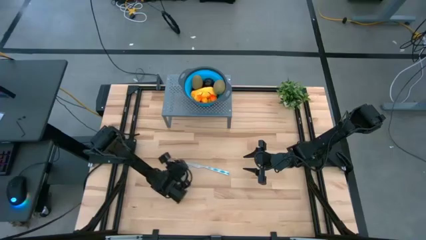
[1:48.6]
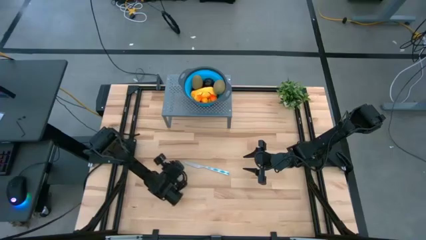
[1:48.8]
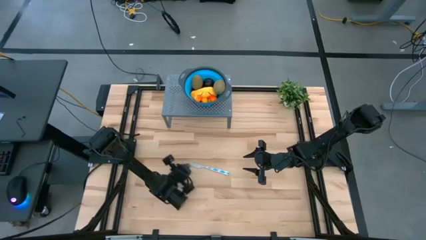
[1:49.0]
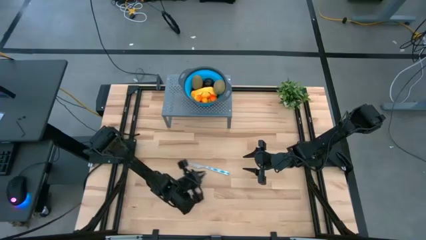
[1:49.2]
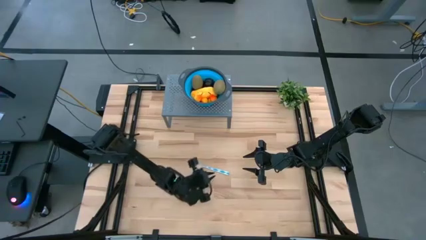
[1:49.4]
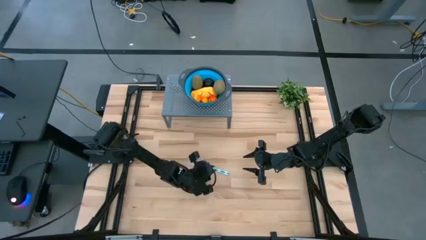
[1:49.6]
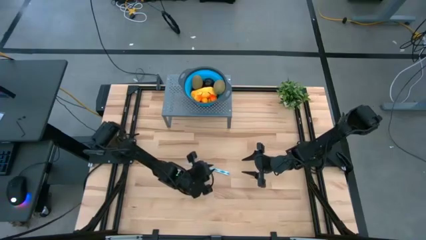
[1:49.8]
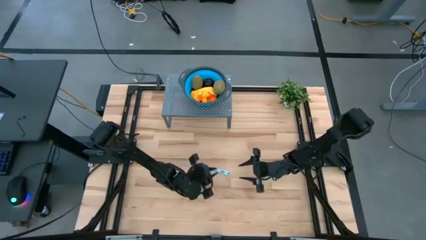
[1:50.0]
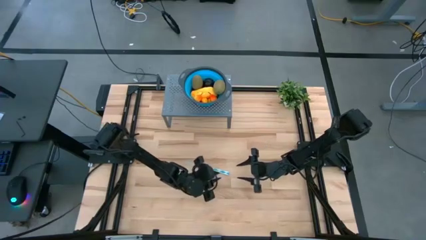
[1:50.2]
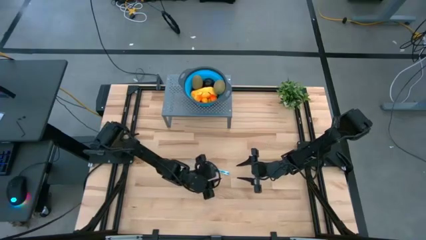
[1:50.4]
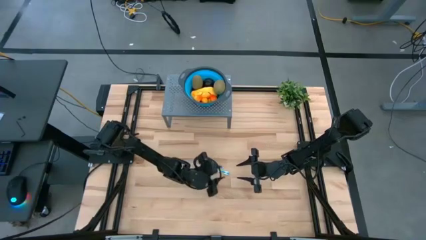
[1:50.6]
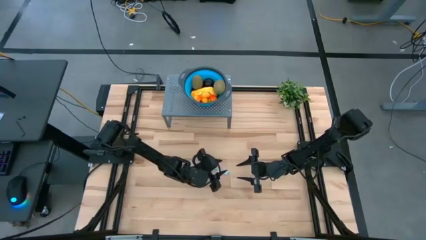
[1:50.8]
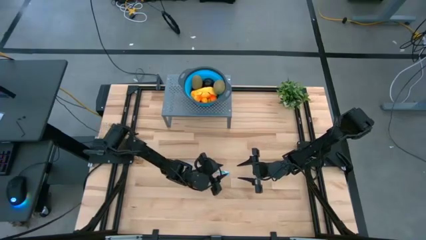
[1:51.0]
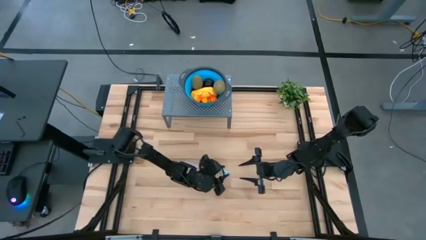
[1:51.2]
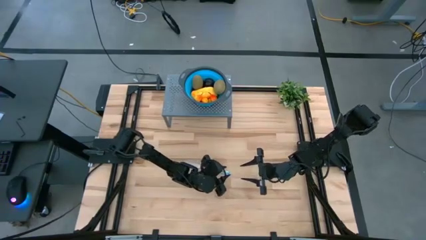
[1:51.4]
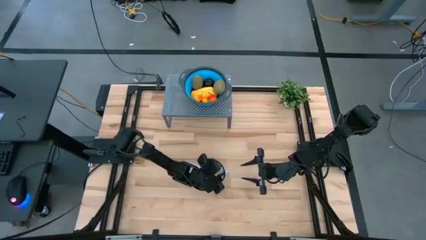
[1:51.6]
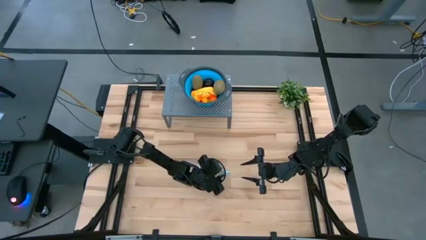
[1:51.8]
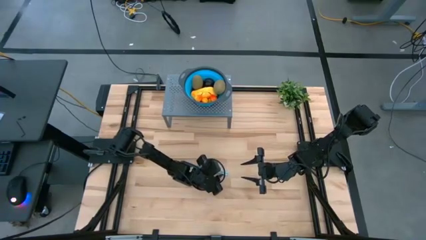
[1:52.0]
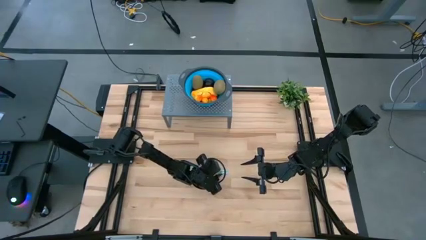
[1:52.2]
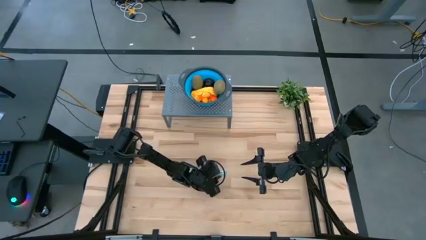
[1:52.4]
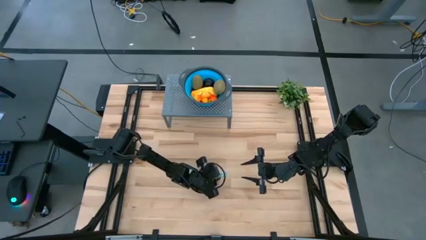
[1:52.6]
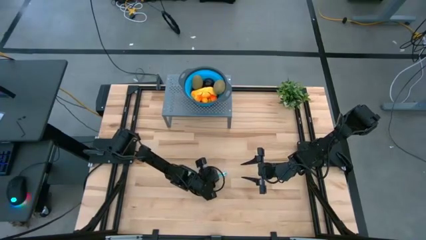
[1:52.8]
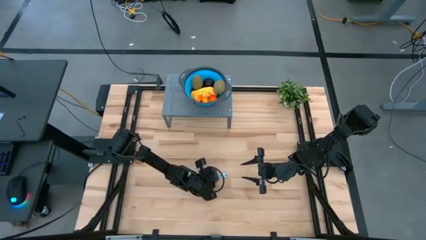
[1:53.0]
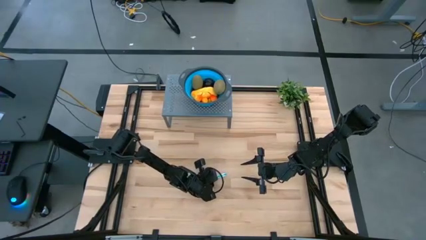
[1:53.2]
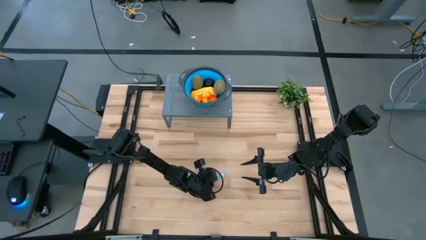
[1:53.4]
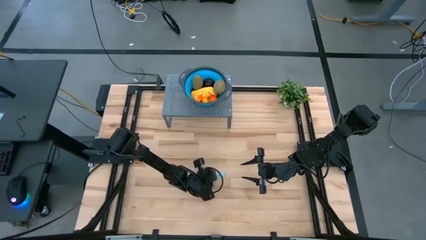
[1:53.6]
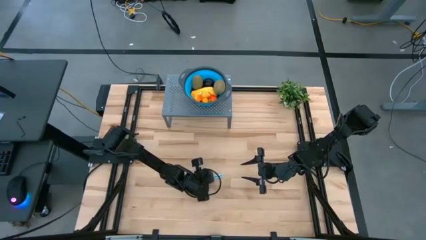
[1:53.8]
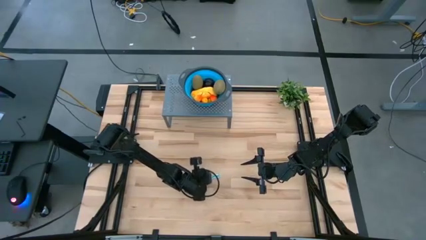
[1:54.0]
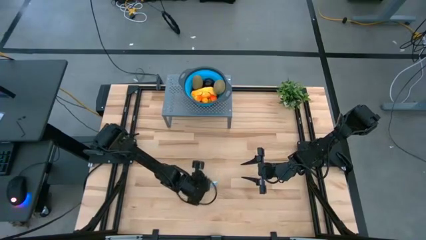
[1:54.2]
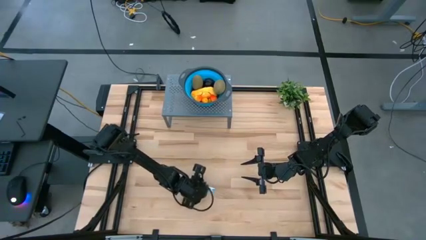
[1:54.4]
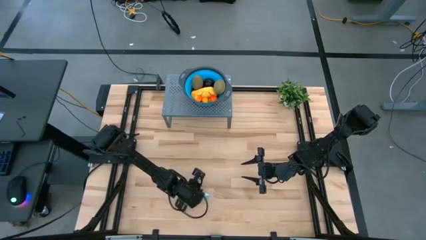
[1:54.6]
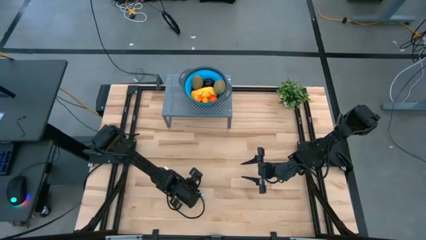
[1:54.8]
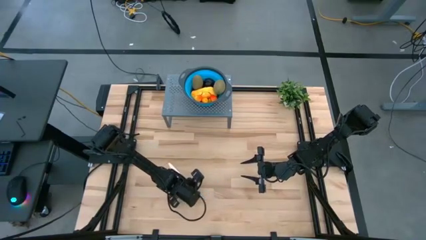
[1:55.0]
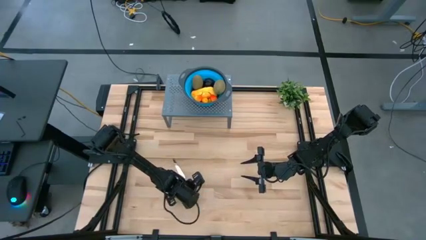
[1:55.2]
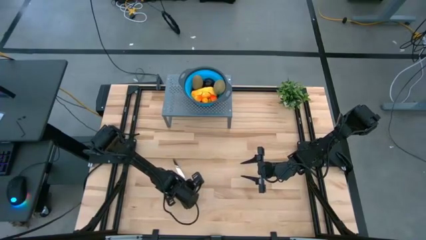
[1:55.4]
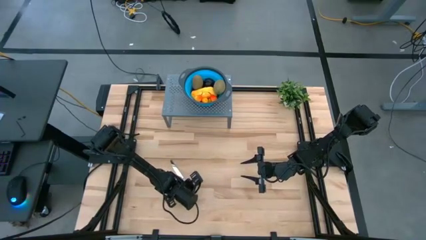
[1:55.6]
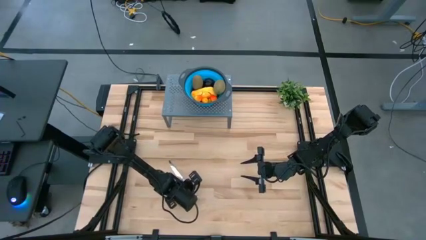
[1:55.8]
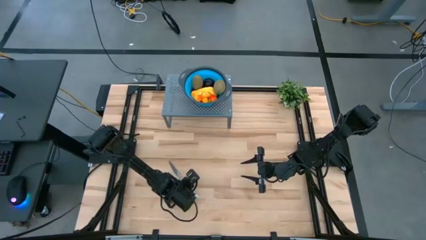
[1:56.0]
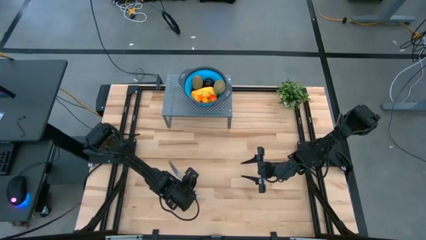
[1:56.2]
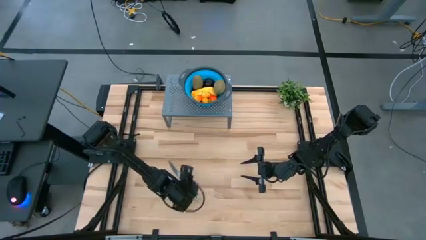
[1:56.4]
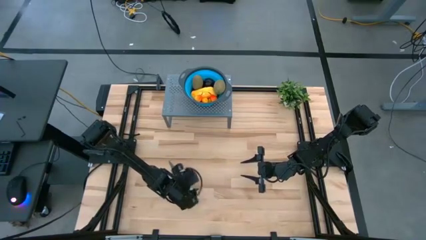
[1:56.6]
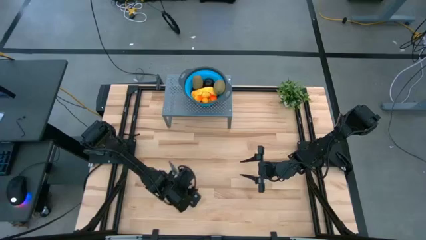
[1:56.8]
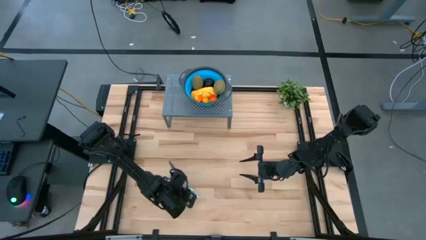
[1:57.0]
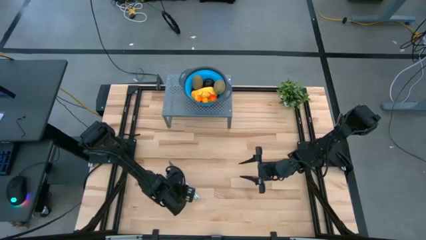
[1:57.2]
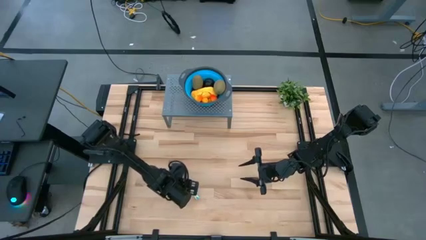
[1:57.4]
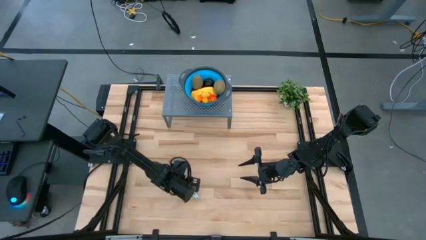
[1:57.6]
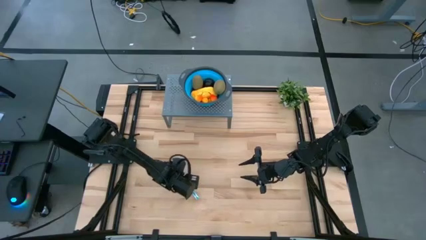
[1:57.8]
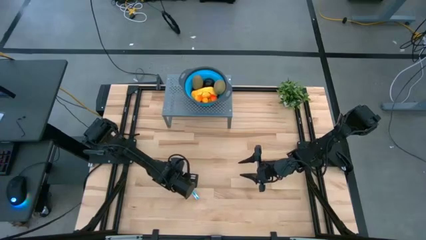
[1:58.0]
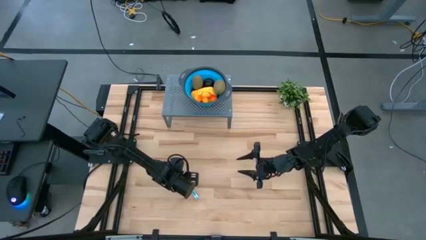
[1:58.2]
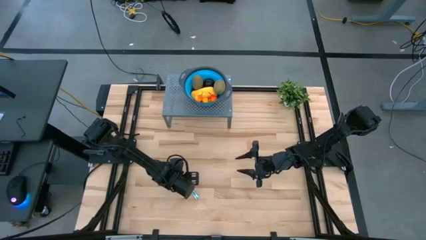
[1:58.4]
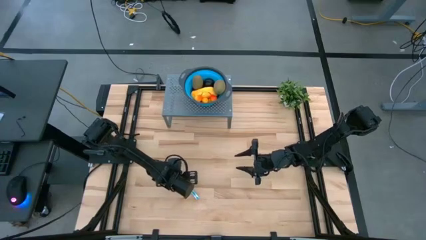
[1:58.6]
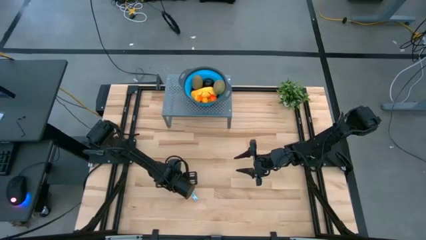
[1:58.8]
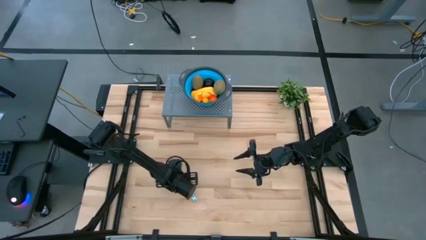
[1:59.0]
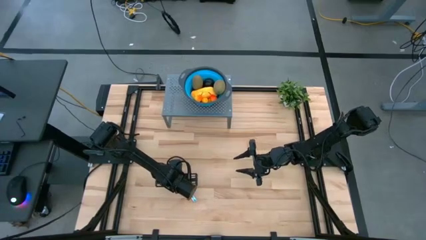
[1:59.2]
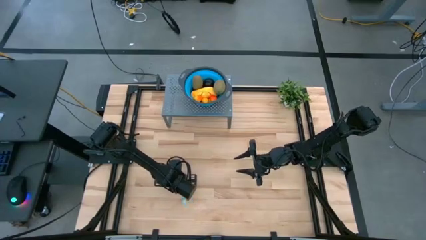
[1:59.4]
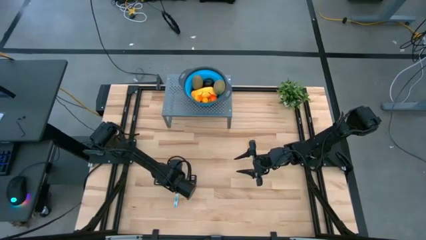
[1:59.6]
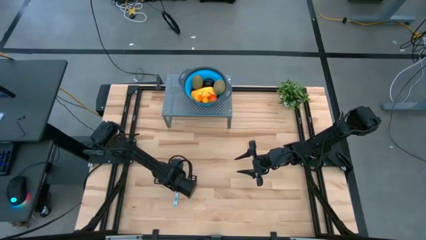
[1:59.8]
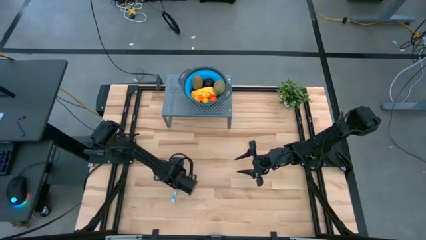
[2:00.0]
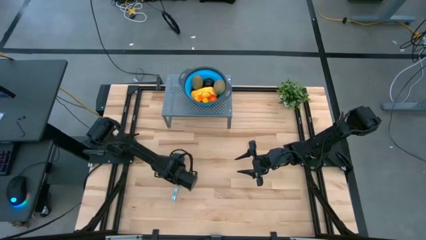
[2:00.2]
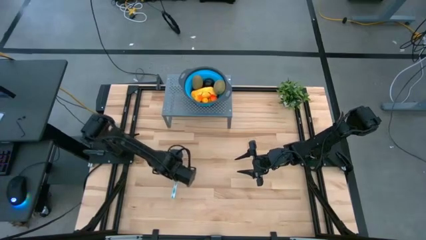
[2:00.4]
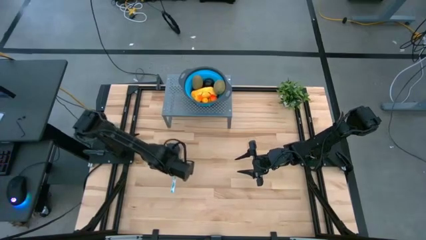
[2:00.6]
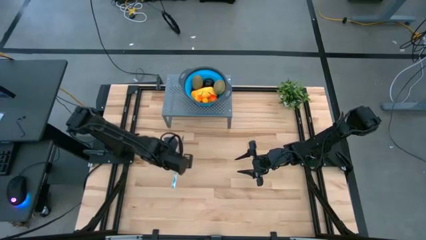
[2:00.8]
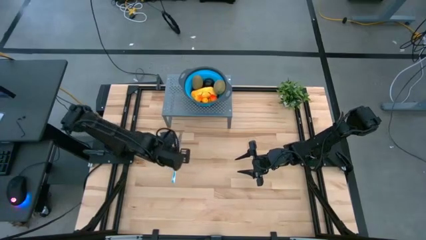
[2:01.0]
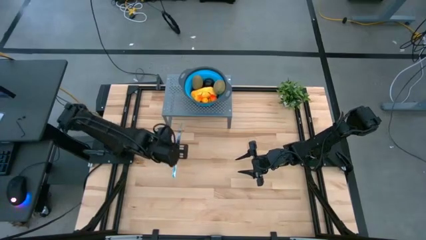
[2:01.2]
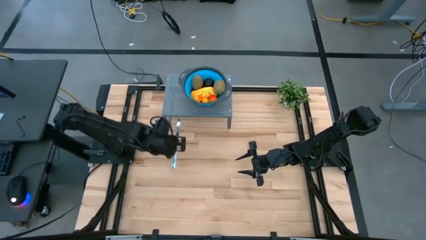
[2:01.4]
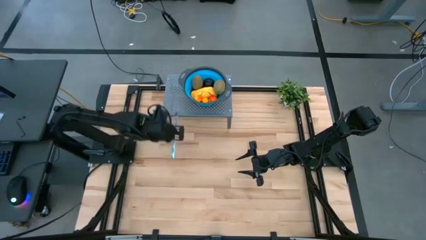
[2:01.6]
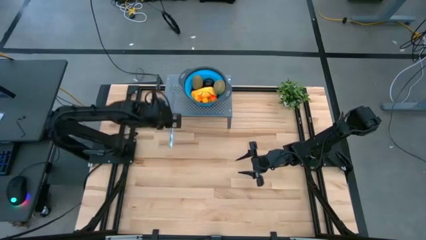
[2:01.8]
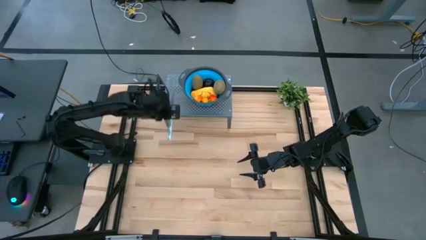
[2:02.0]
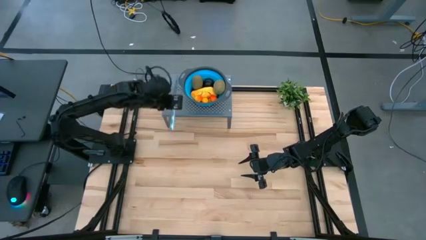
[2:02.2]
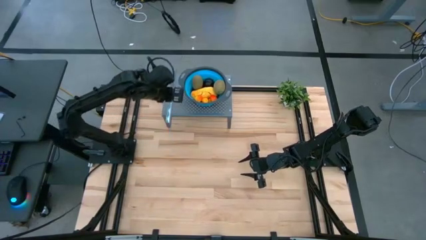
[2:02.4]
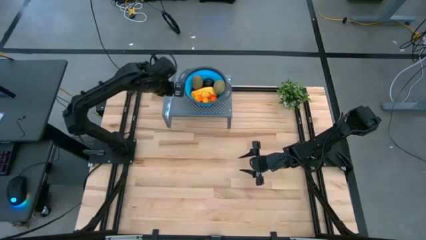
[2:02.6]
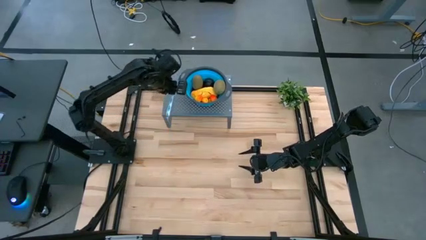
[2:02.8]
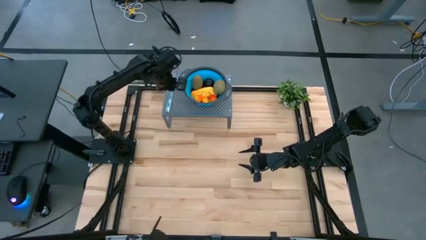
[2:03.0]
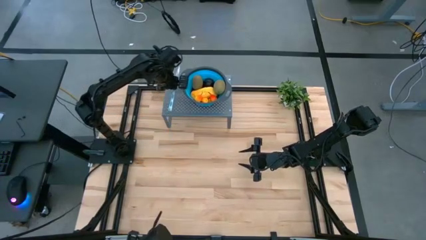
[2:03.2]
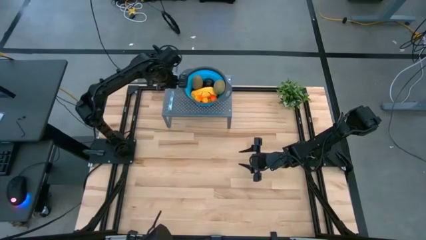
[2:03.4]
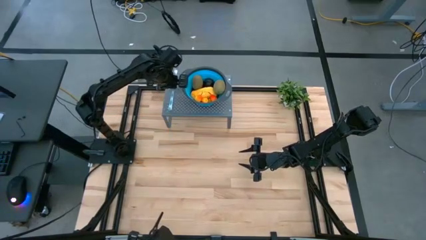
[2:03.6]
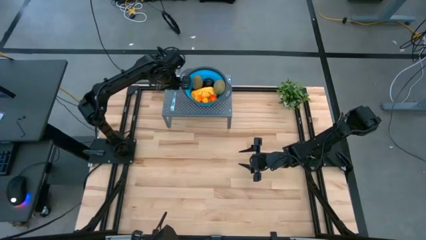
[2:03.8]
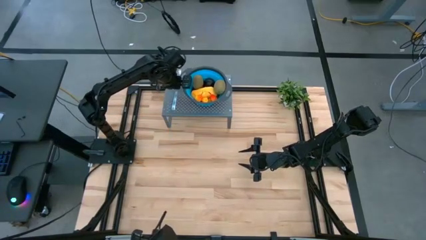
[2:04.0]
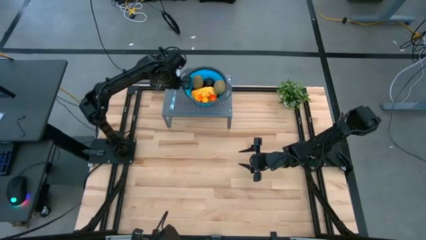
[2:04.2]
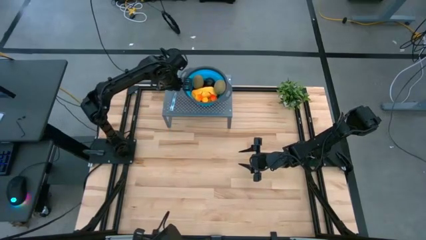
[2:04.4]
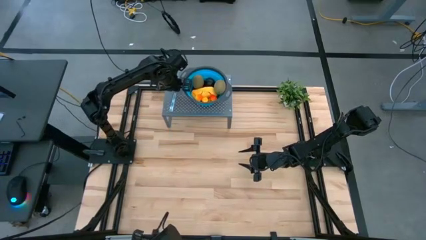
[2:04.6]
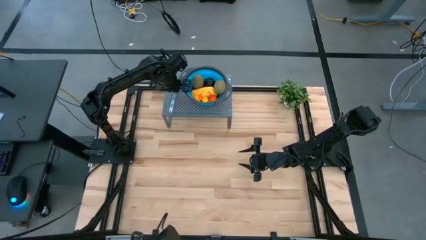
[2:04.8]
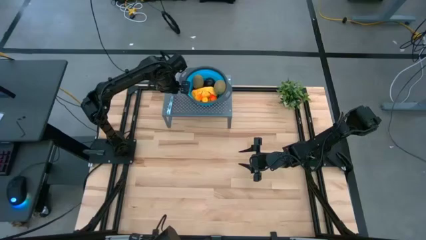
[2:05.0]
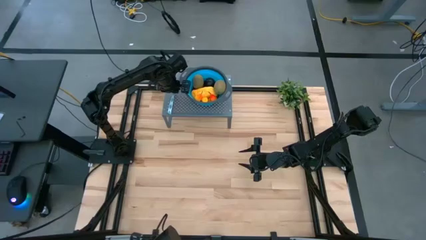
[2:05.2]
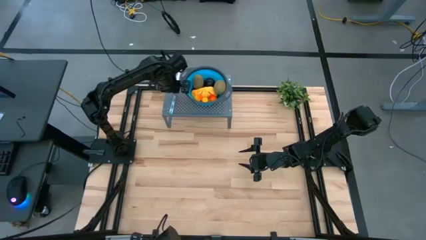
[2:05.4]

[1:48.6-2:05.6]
Task: Pick & Place Fruit
Put the blue knife on the shelf
